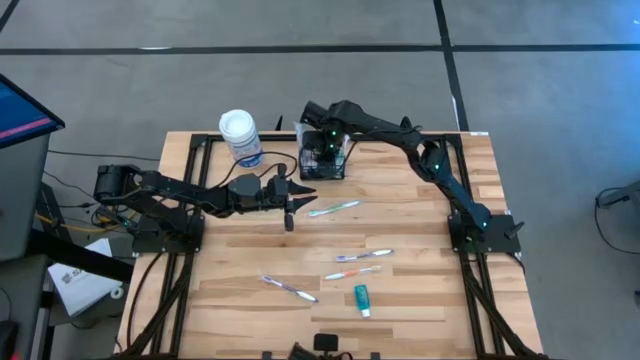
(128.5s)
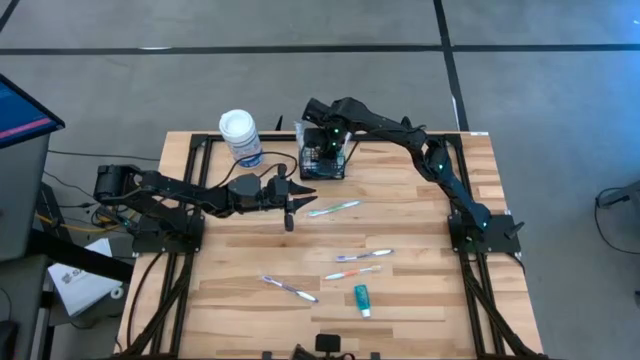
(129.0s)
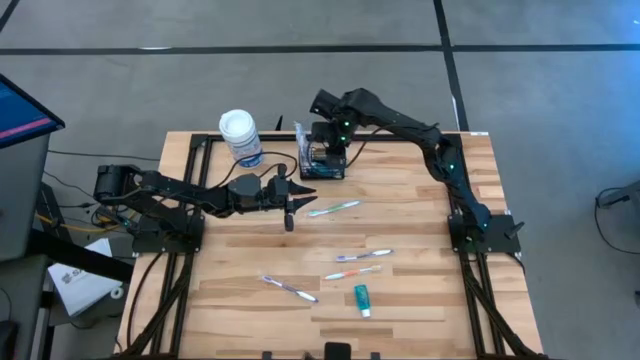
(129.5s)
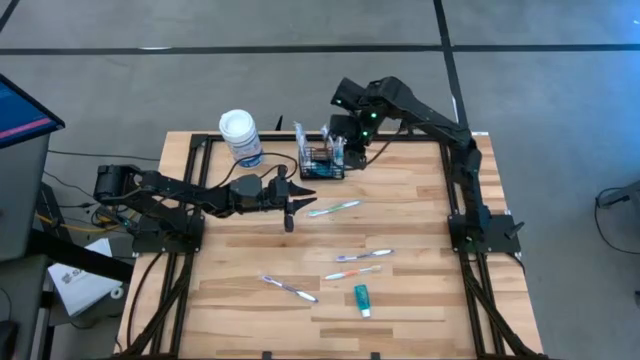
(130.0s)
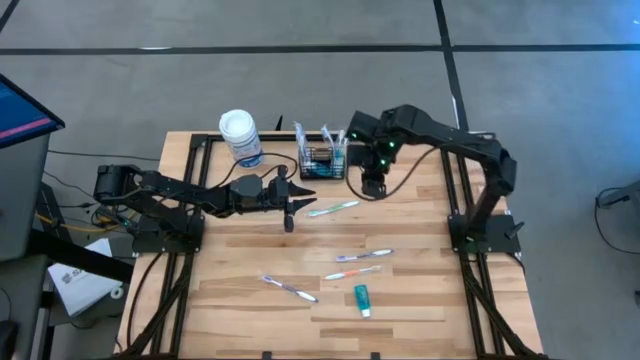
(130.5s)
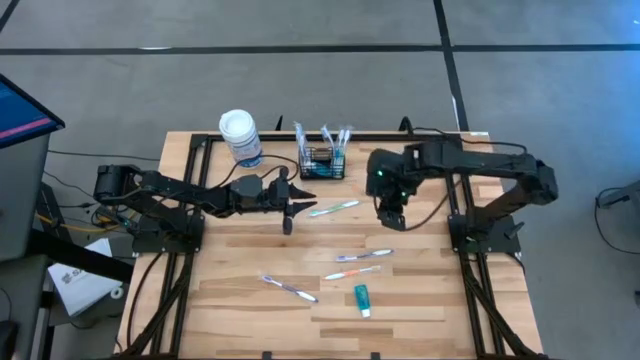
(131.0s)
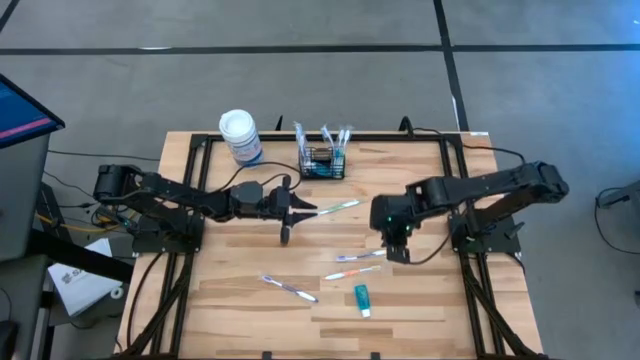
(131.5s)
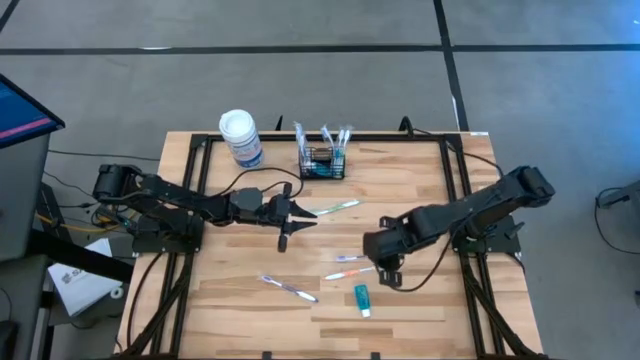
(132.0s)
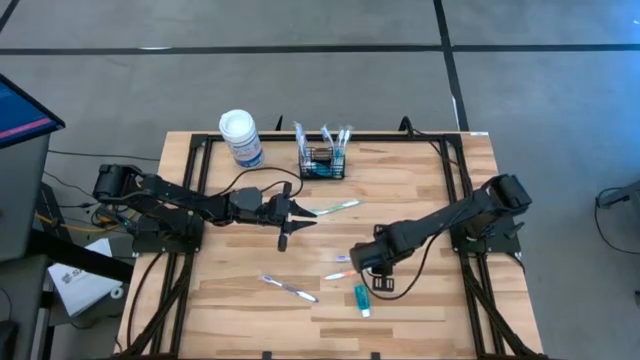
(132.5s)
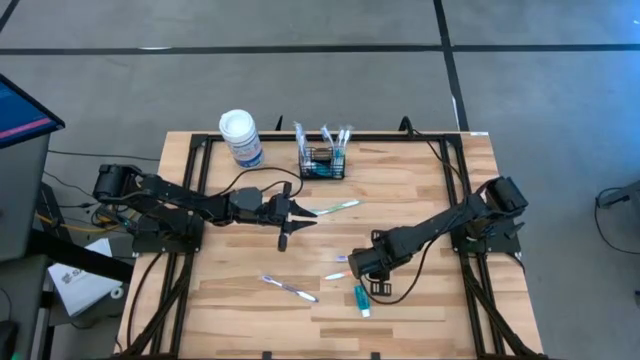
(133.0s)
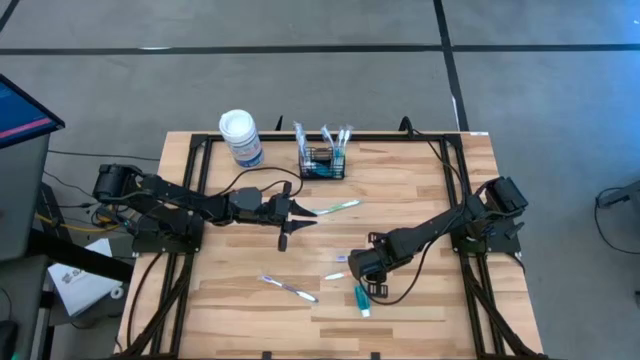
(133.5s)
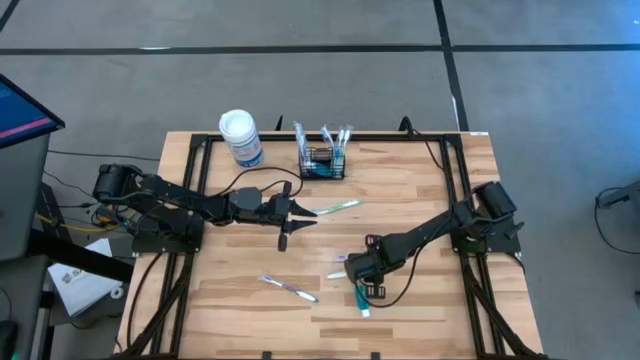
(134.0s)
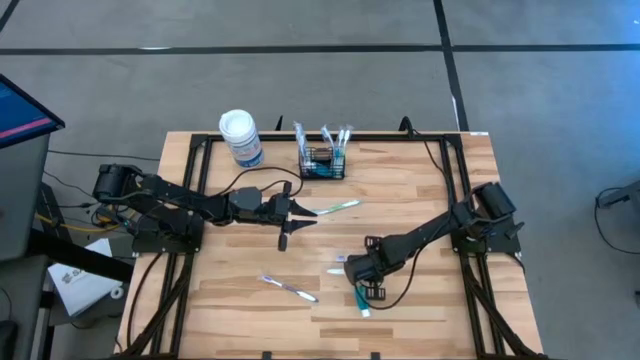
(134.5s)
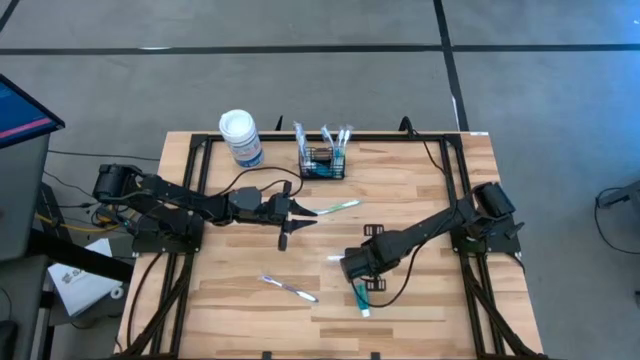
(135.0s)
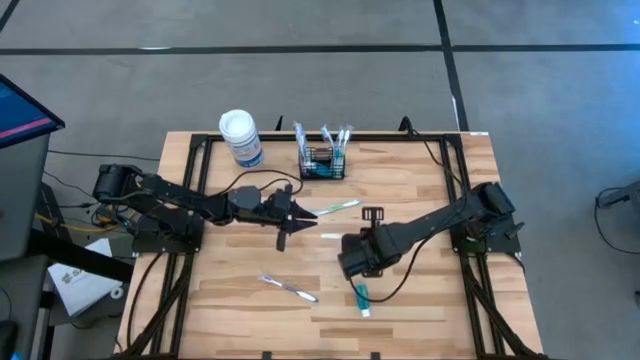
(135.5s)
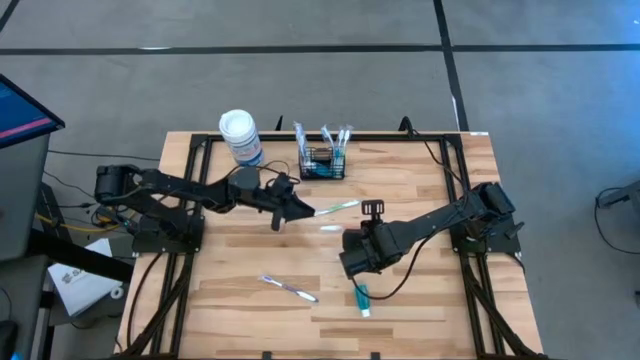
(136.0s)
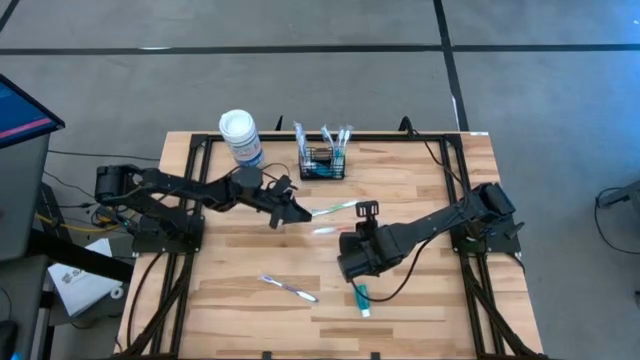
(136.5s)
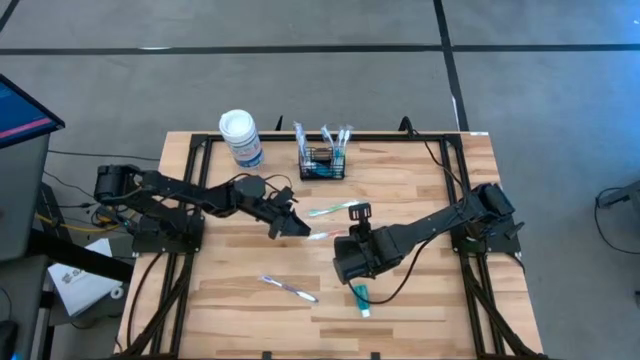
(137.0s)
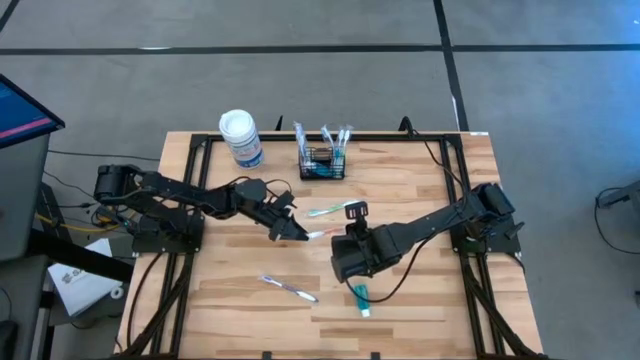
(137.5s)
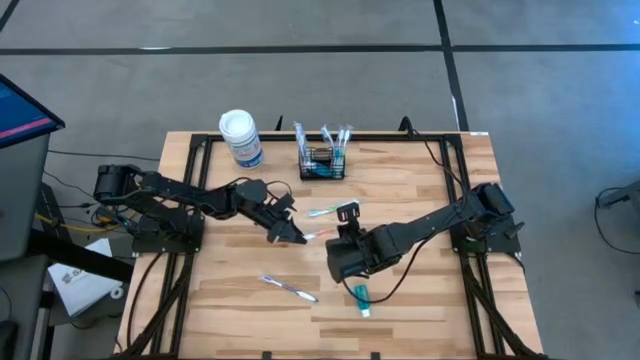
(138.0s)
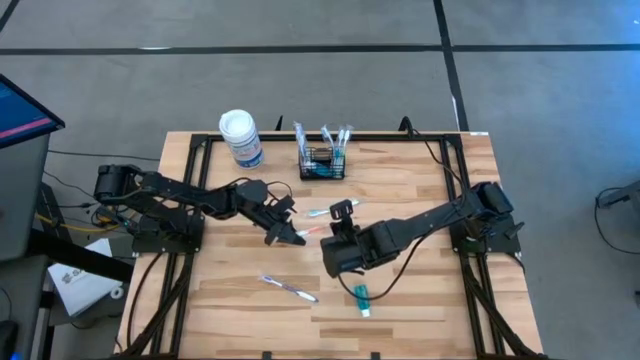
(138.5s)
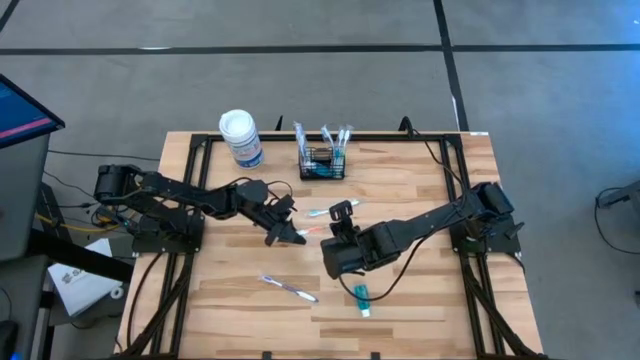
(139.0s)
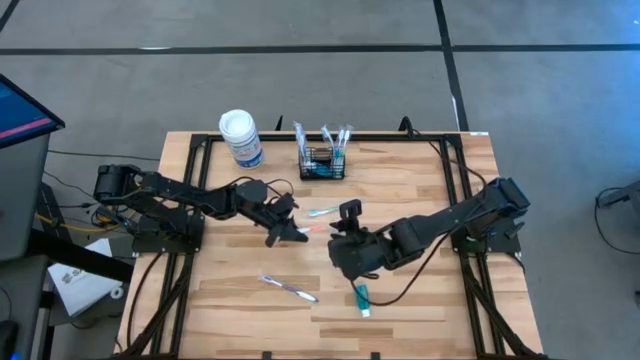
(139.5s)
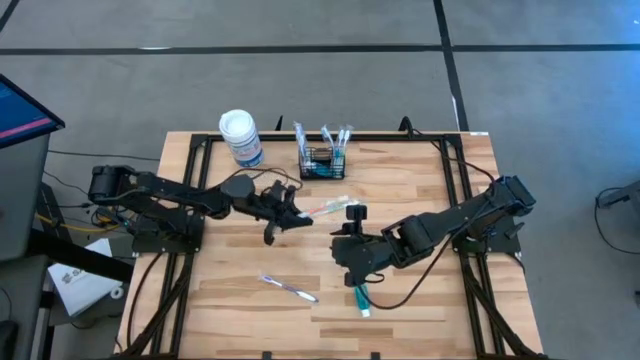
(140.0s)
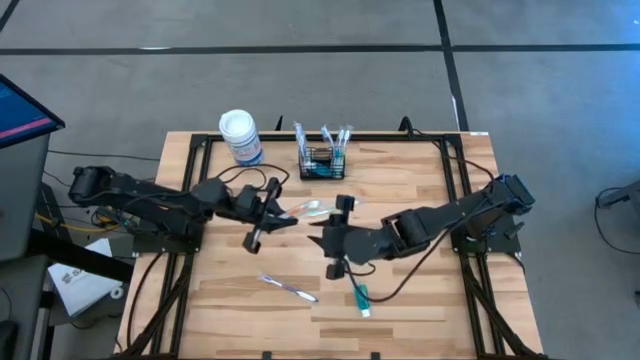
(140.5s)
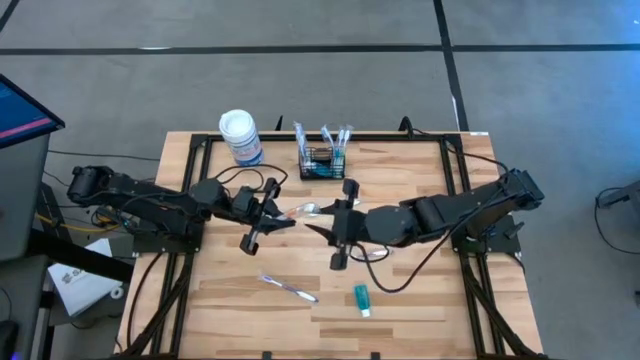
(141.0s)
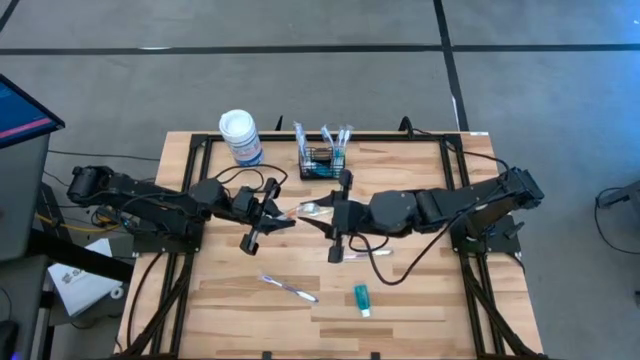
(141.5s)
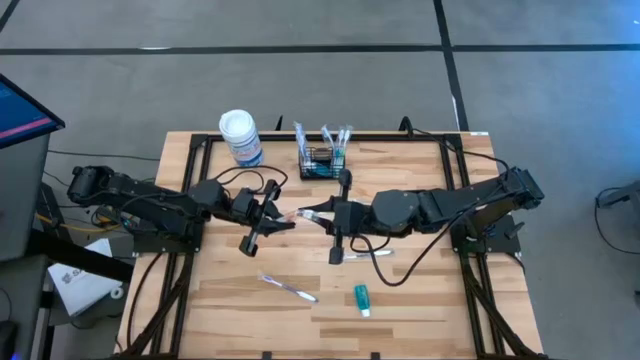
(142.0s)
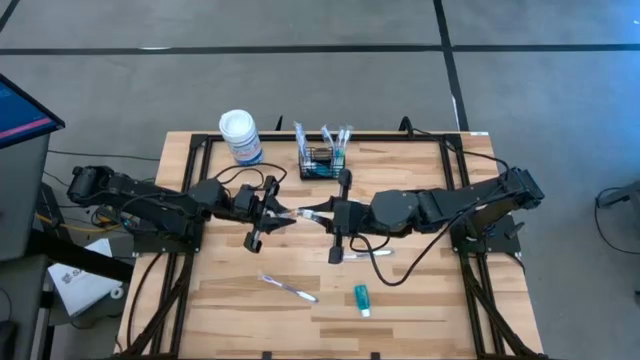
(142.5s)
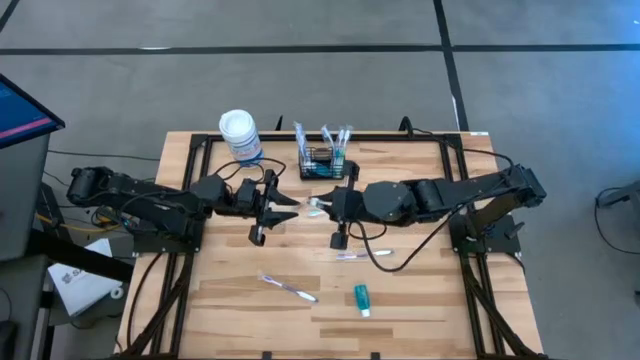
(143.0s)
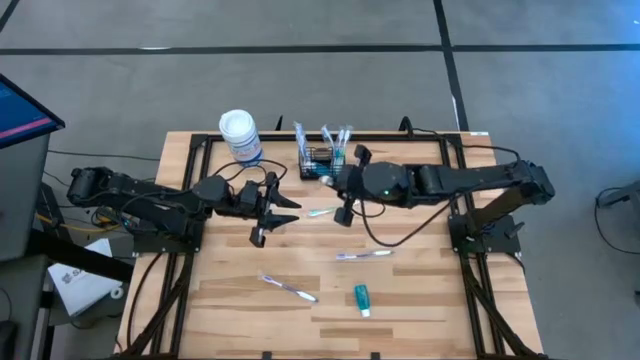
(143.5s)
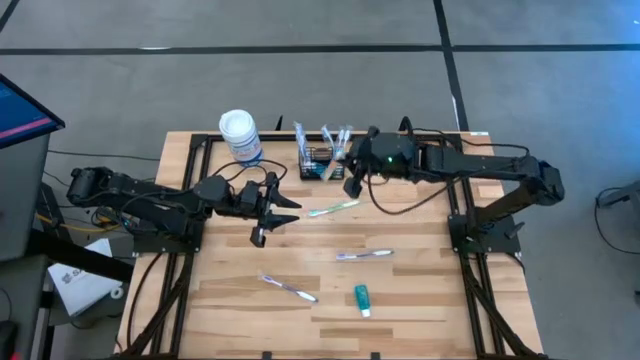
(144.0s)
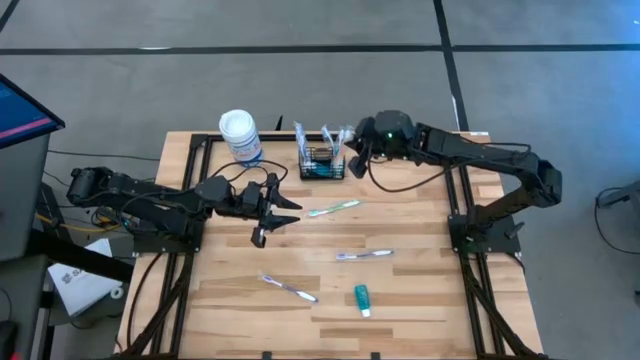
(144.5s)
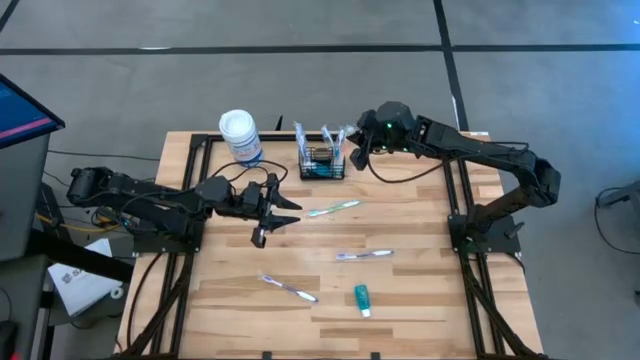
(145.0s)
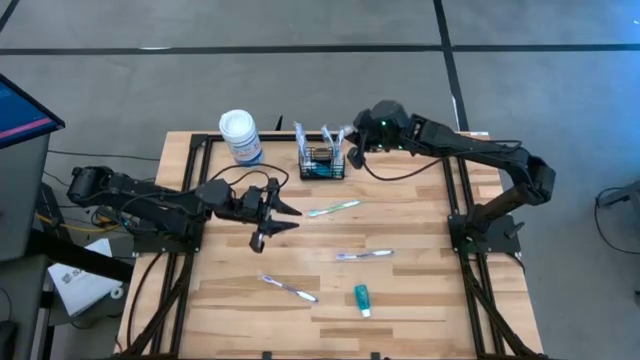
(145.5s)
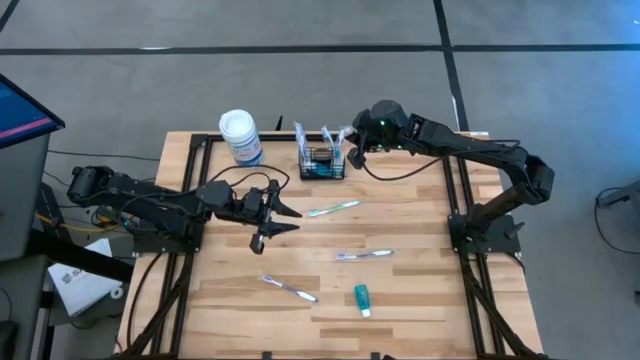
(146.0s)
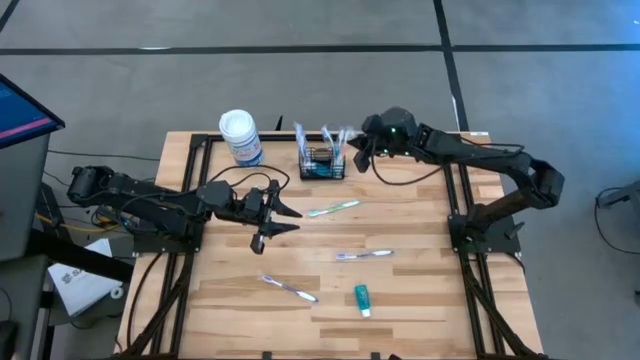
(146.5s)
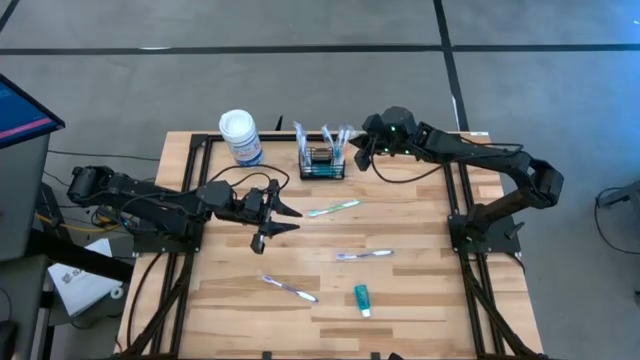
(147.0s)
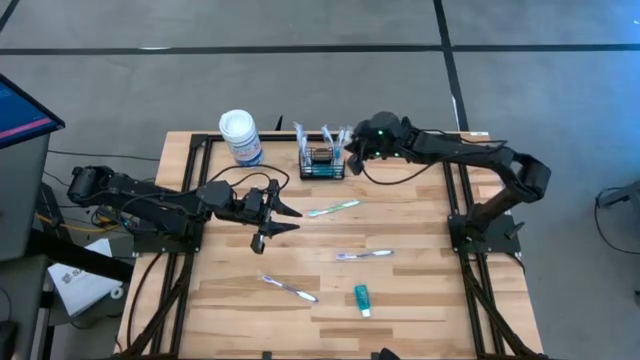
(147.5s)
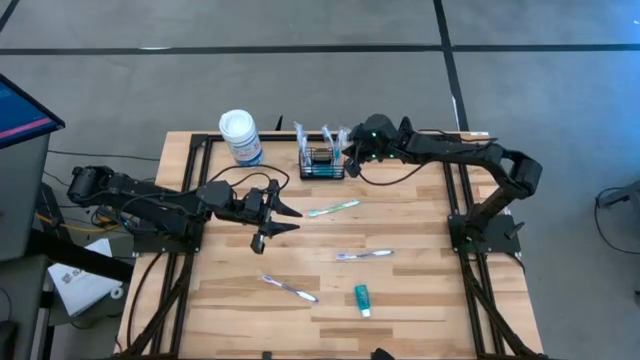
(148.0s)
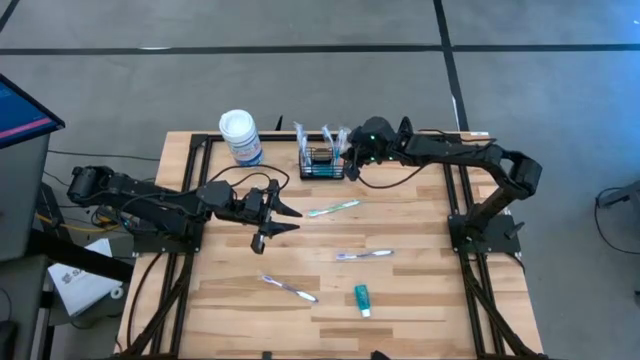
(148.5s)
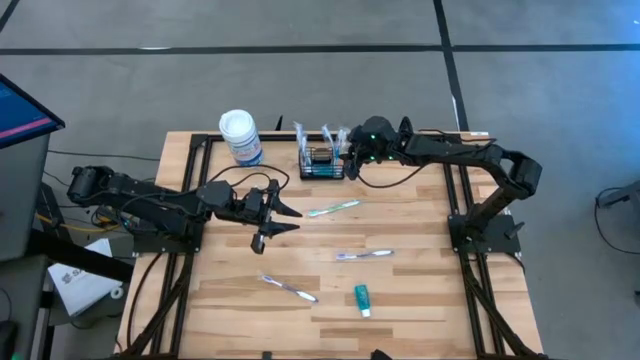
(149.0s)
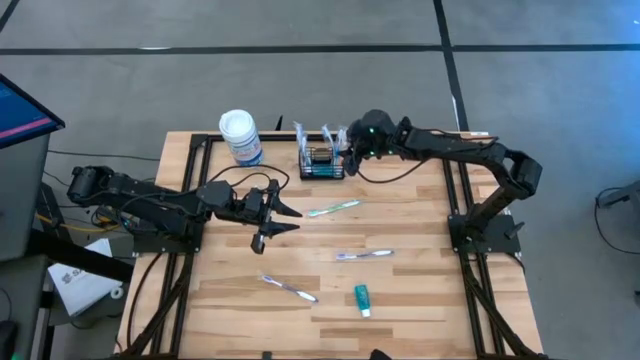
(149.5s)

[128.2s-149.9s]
Task: Pick & Place toothbrushing station
Put the orange toothbrush into the black wire organizer

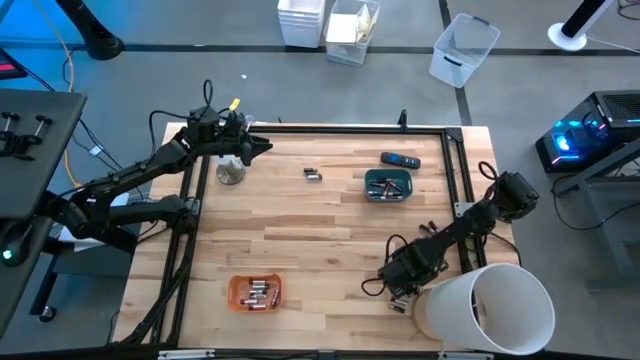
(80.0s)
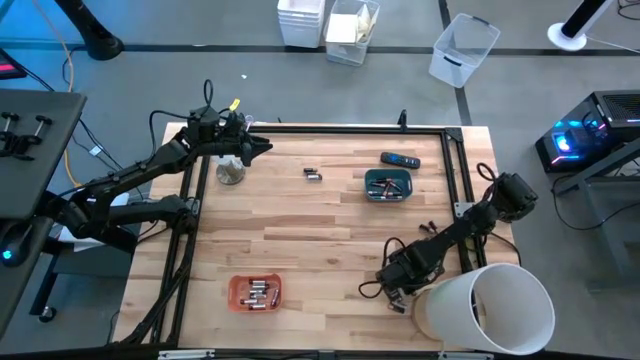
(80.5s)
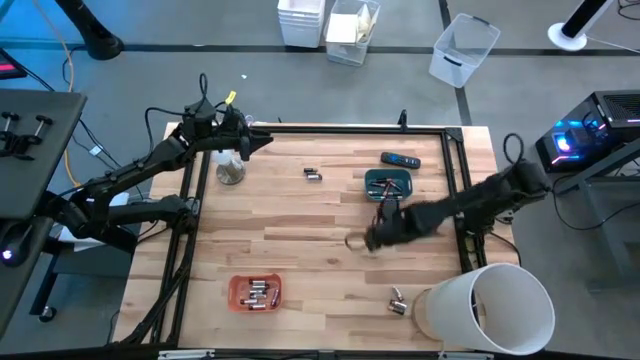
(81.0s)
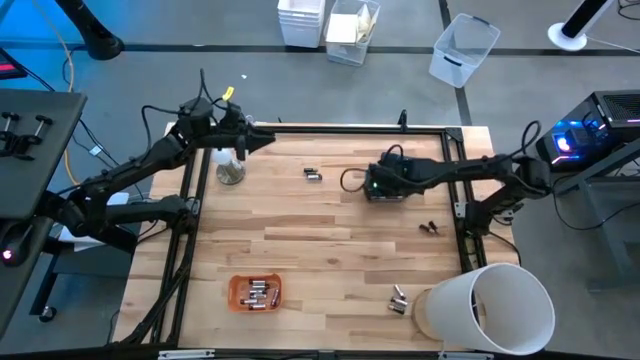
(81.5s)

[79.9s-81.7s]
Task: Sort batteries
Put the black battery into the blue bin
